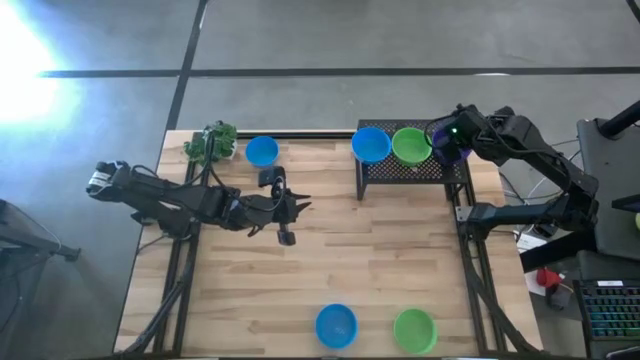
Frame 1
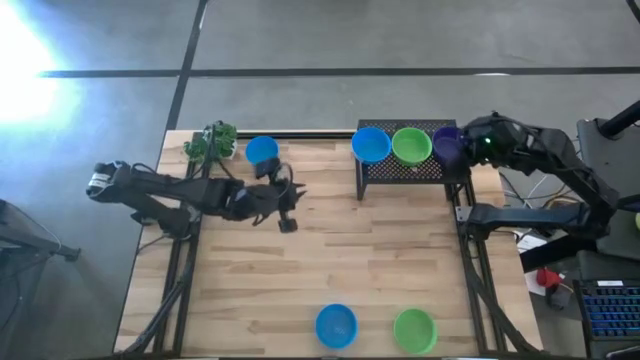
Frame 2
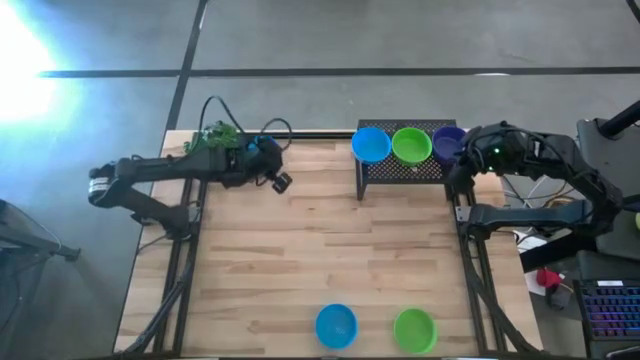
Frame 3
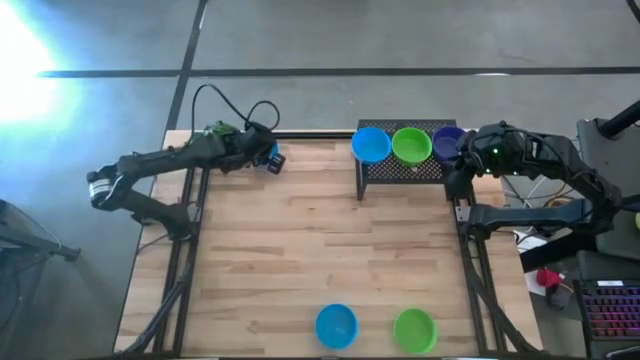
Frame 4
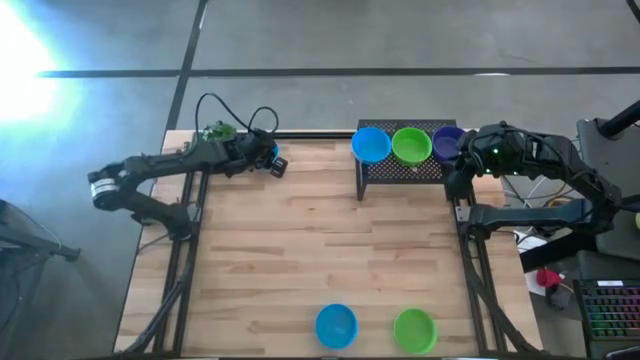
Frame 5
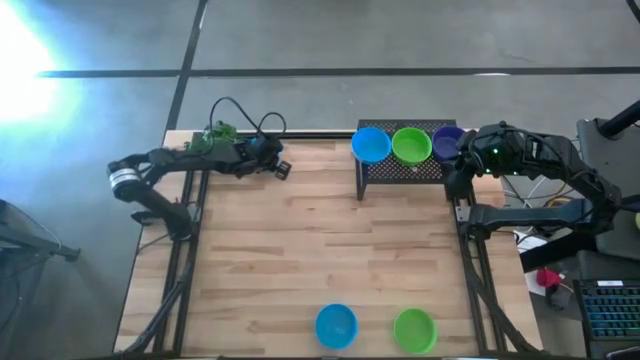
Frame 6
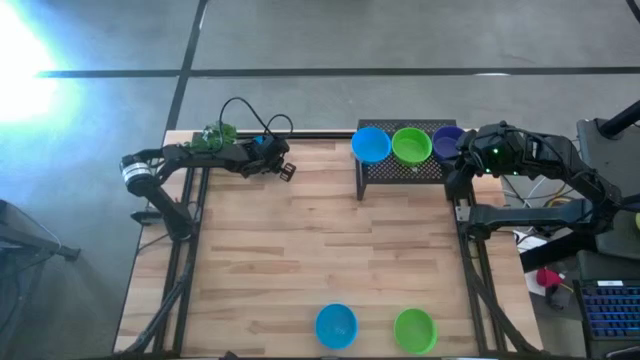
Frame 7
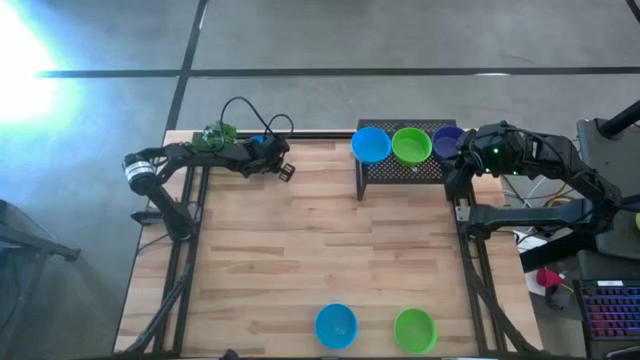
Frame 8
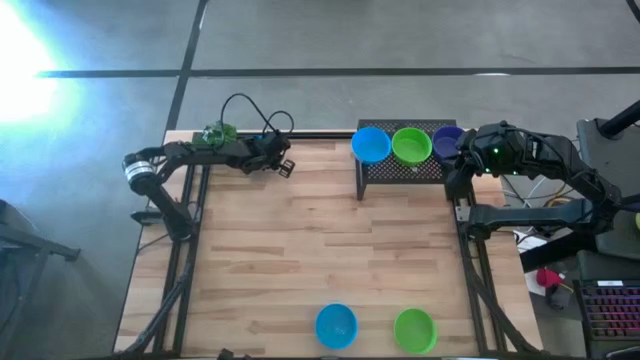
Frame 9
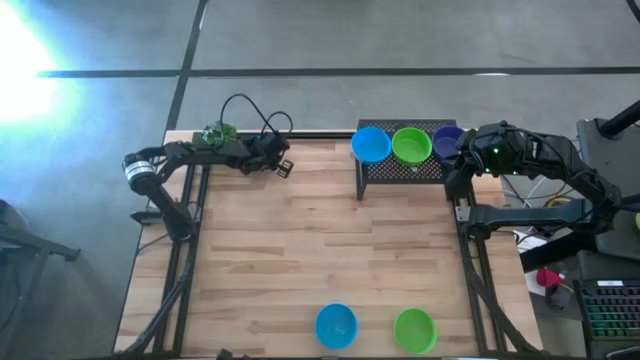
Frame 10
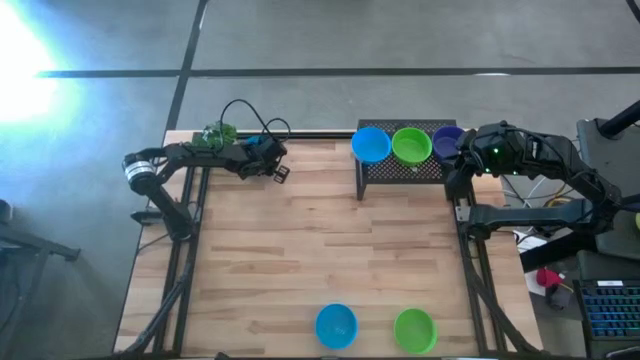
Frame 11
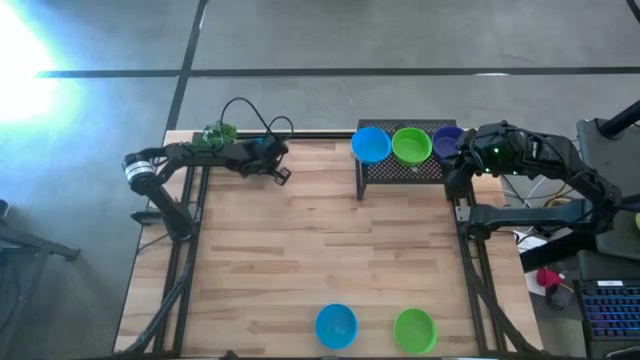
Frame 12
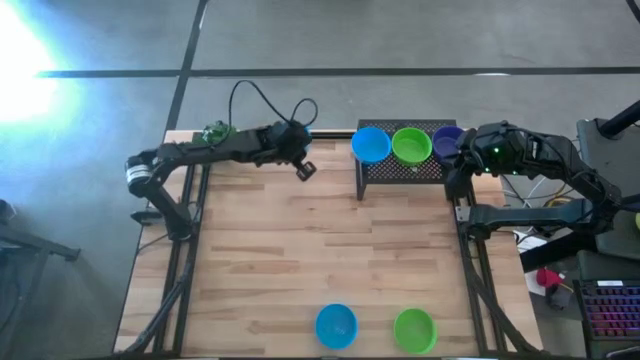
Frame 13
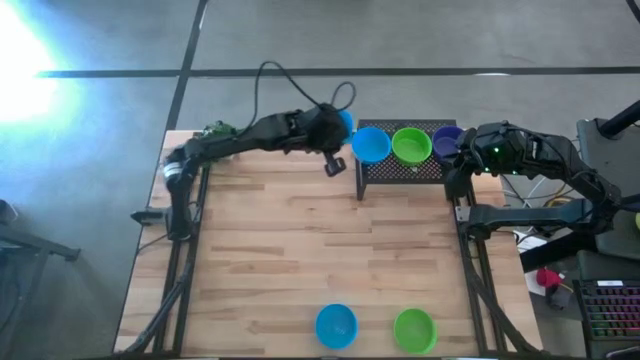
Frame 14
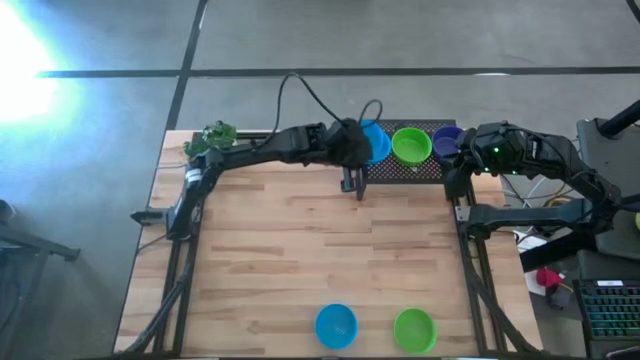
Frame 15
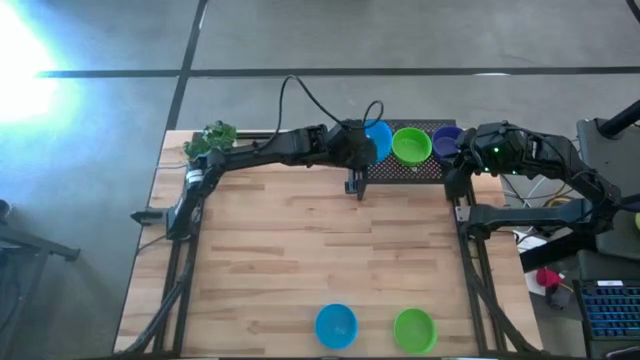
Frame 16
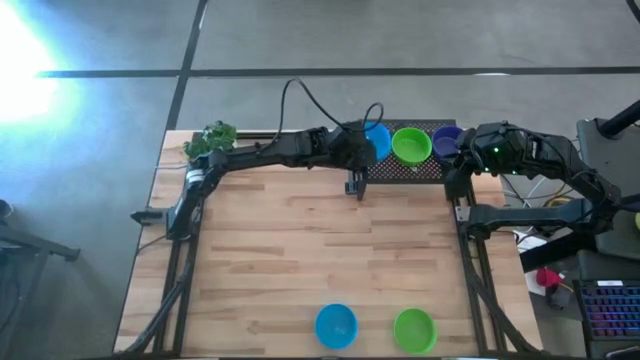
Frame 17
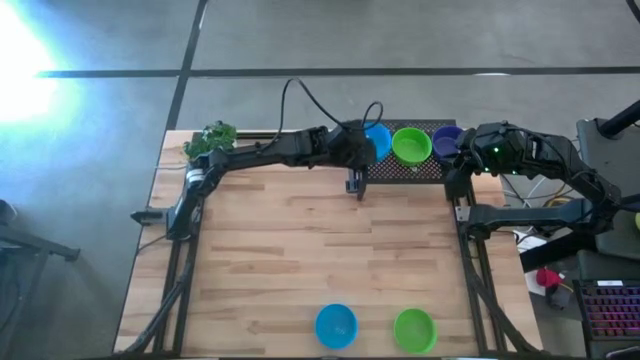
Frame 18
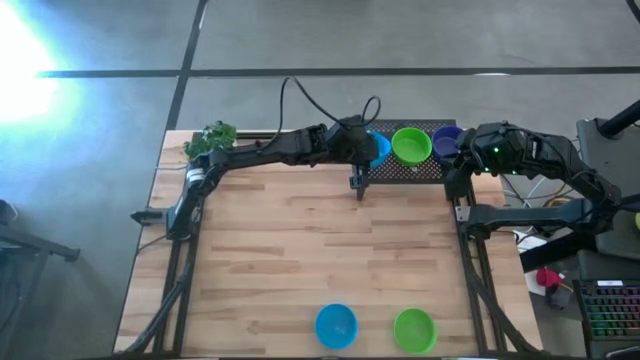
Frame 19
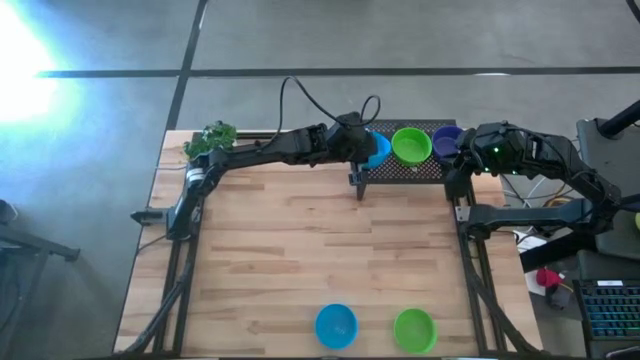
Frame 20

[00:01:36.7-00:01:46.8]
Task: Pick & Place Mini bowls
Stack the top blue bowl on the blue bowl on the shelf

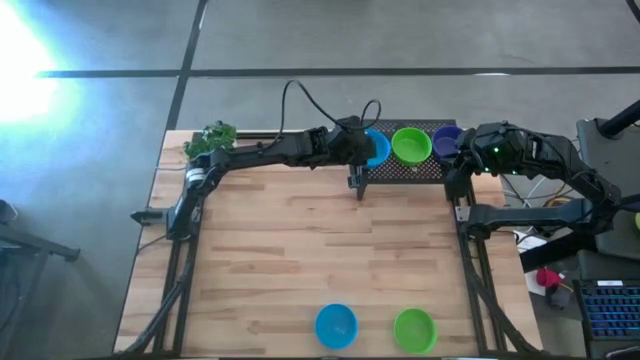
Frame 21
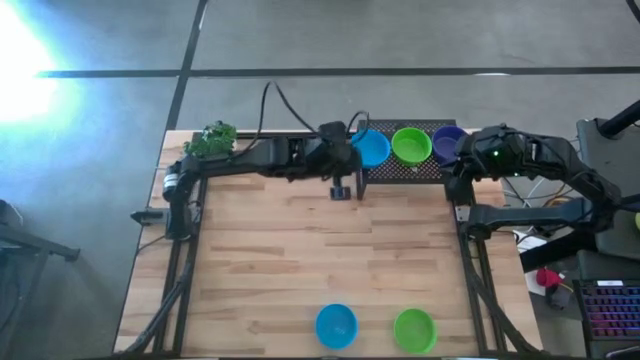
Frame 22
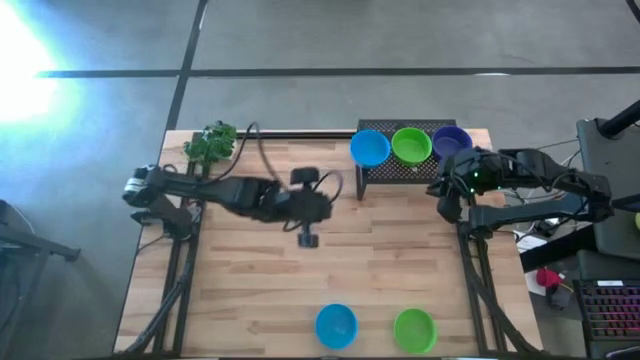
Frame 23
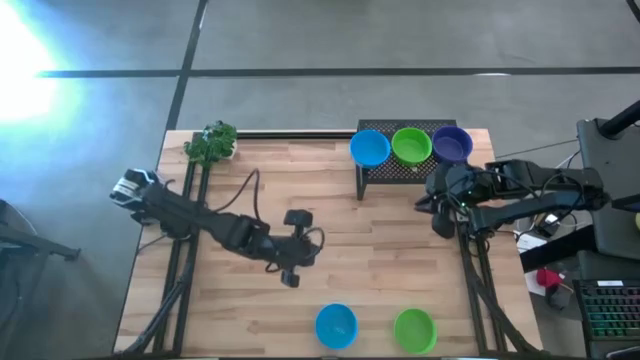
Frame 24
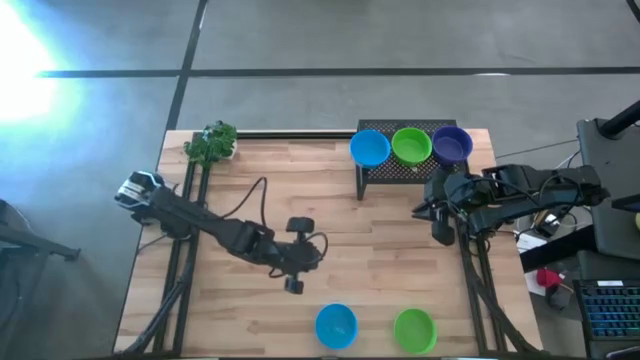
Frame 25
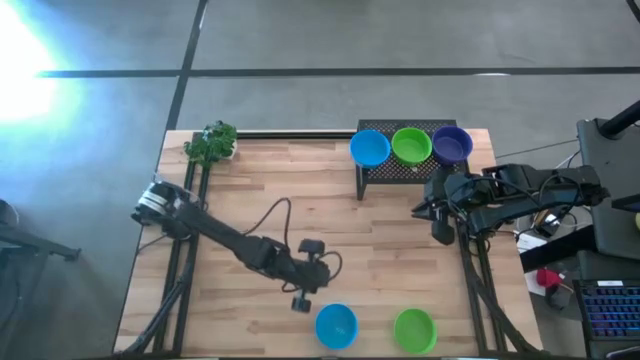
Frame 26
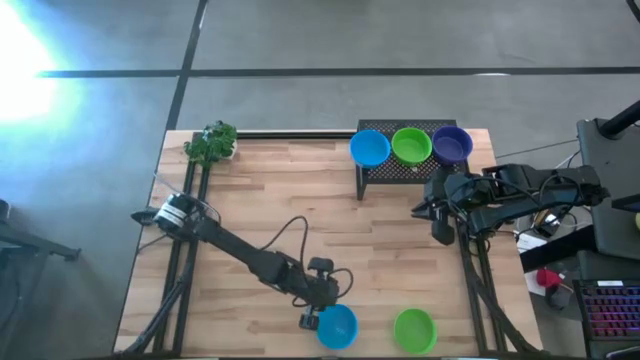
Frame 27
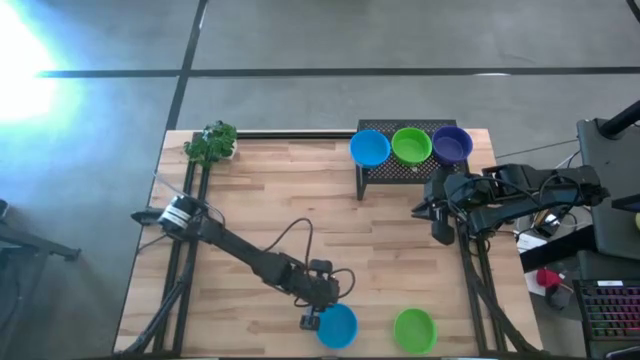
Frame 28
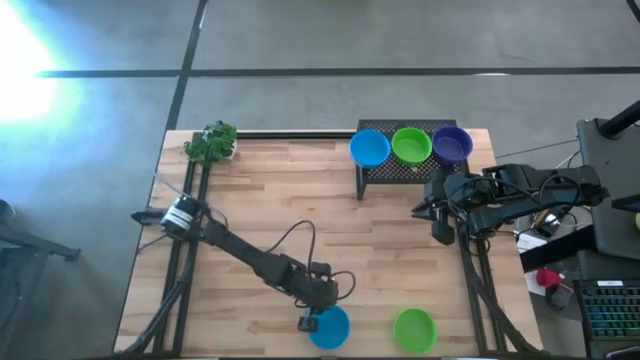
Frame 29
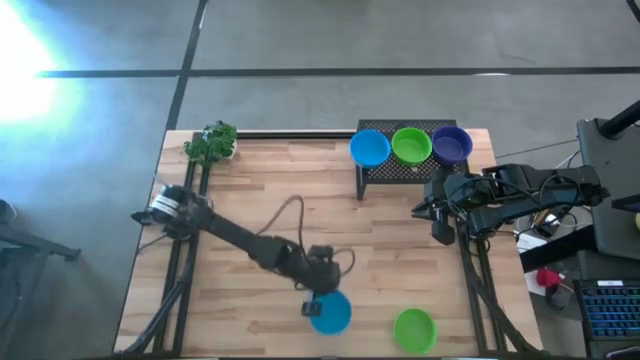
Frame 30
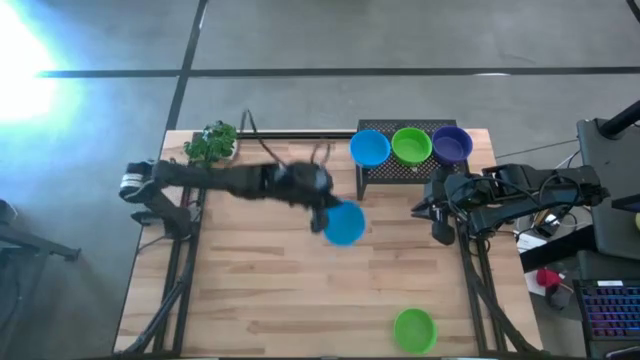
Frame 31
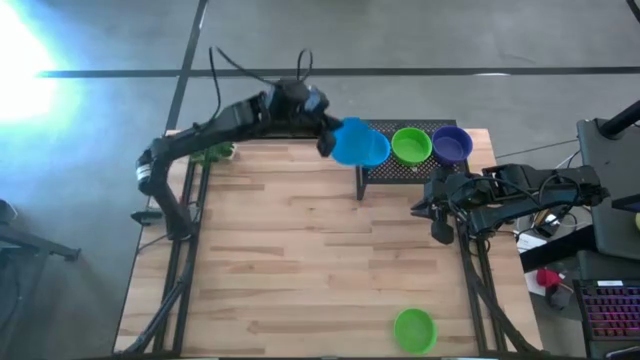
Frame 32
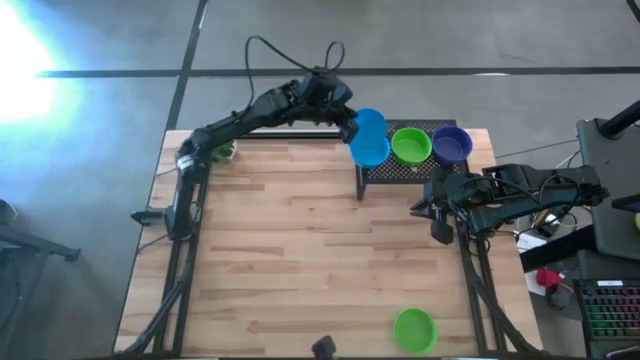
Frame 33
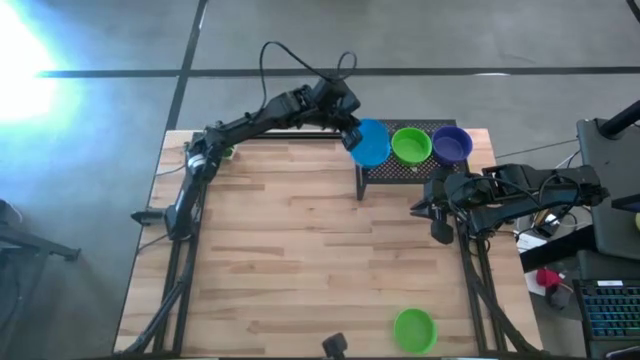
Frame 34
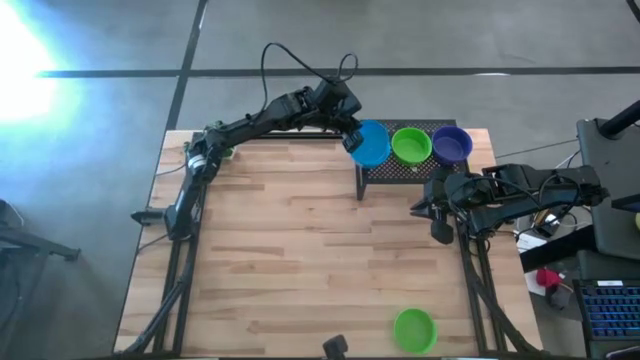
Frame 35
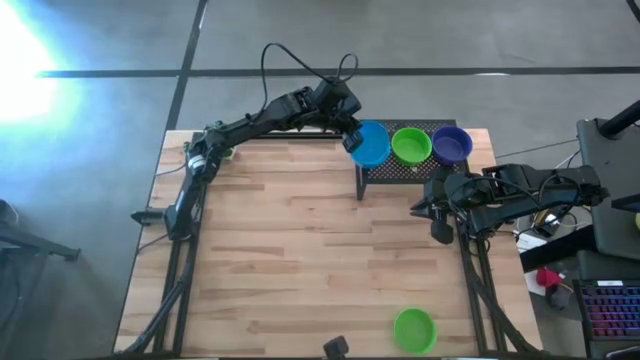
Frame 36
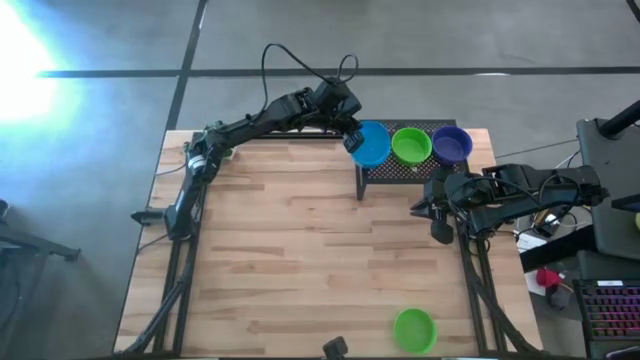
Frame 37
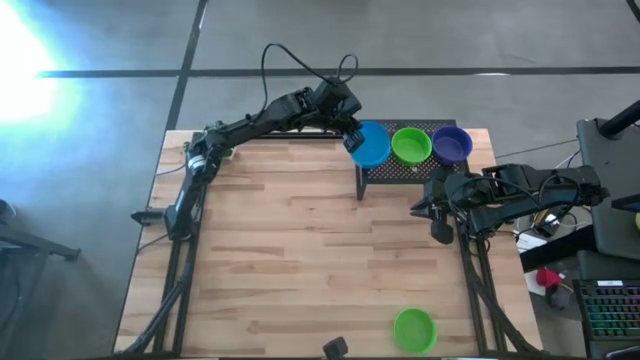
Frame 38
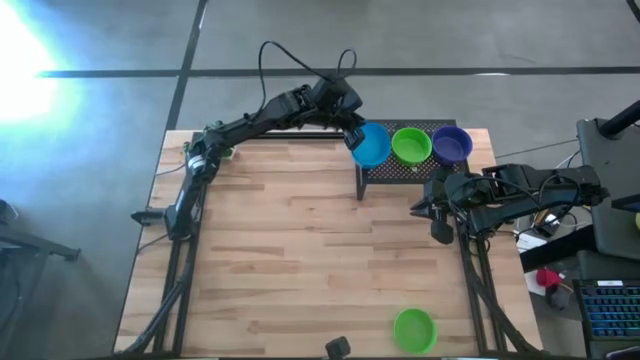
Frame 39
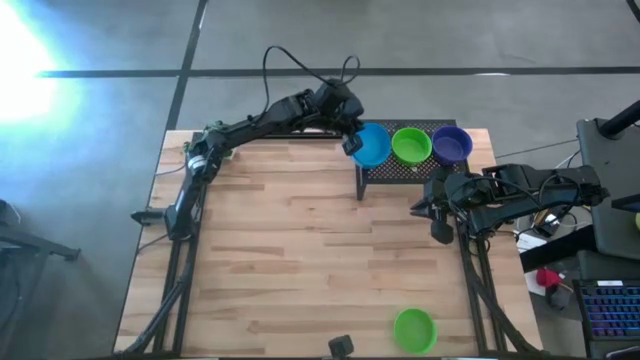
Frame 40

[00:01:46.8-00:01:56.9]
Stack the blue bowl on the stacked blue bowls on the shelf
